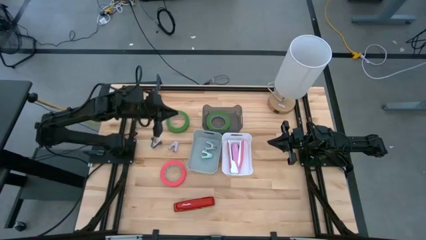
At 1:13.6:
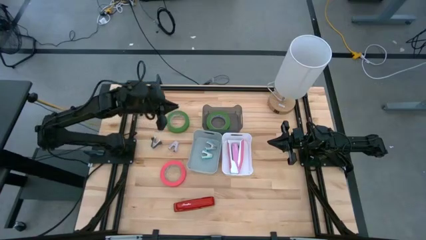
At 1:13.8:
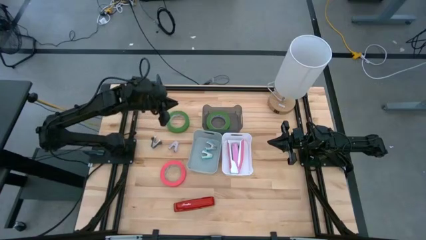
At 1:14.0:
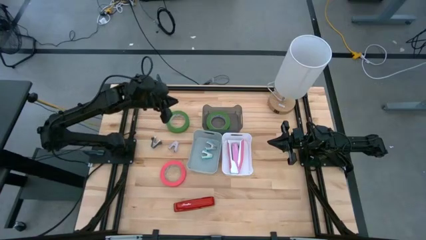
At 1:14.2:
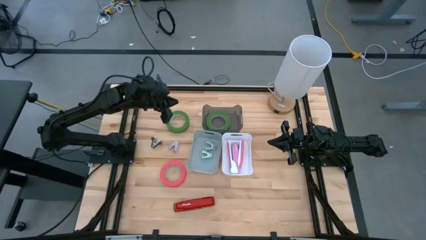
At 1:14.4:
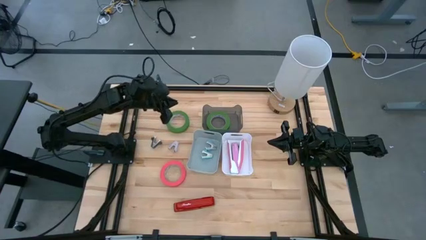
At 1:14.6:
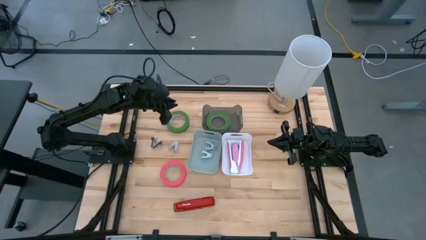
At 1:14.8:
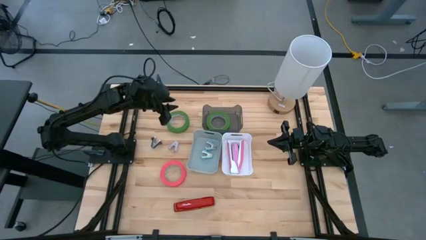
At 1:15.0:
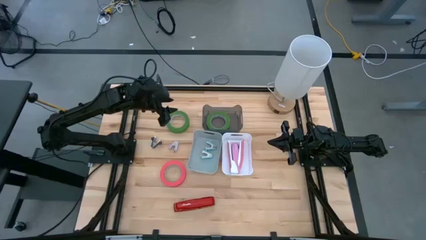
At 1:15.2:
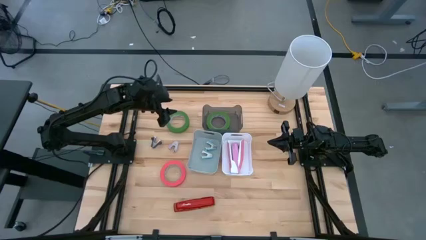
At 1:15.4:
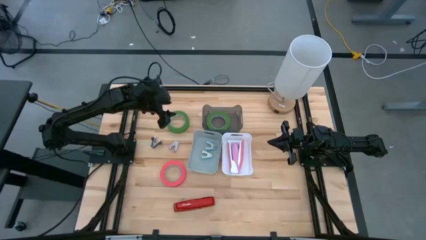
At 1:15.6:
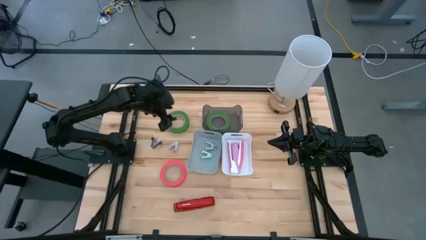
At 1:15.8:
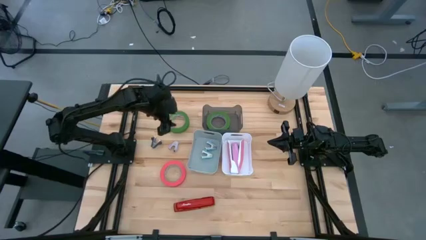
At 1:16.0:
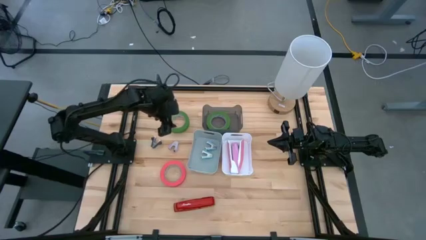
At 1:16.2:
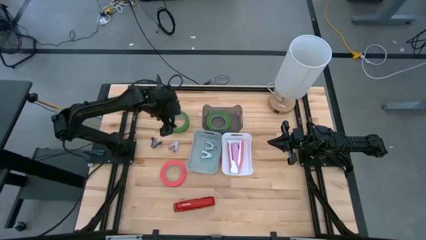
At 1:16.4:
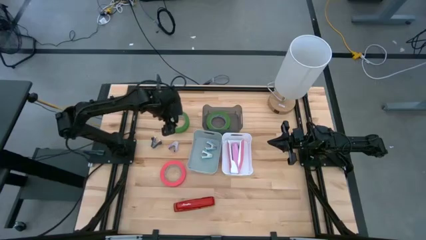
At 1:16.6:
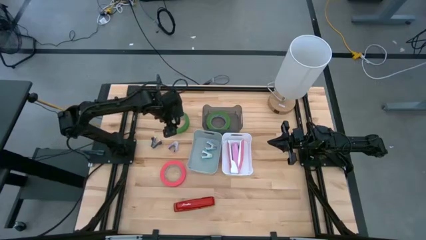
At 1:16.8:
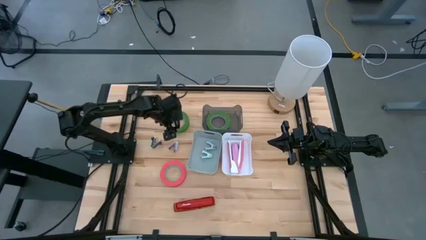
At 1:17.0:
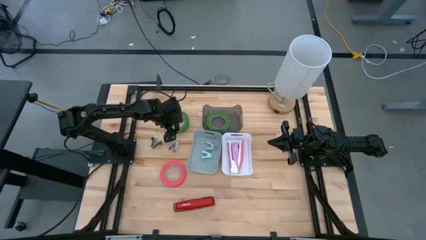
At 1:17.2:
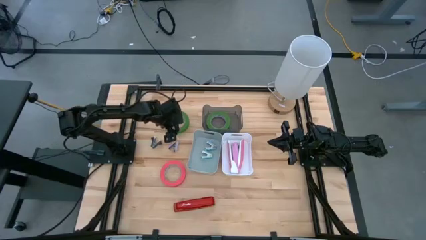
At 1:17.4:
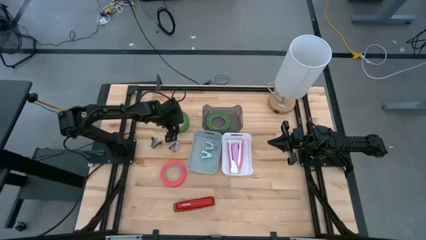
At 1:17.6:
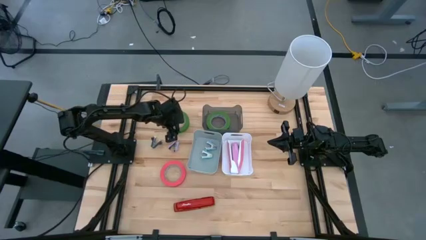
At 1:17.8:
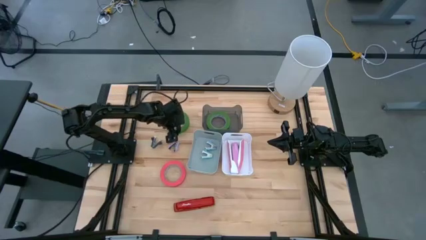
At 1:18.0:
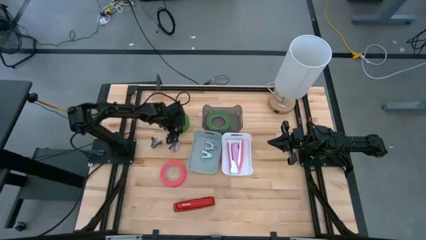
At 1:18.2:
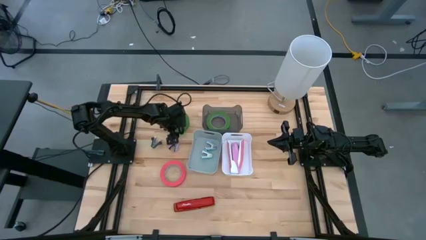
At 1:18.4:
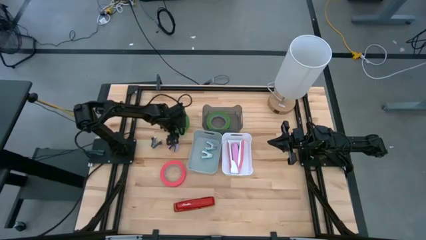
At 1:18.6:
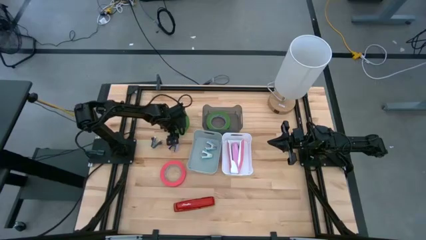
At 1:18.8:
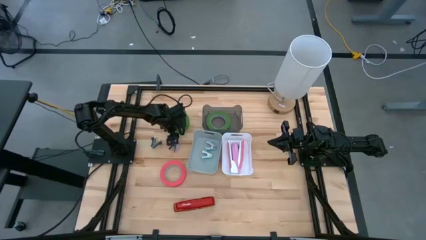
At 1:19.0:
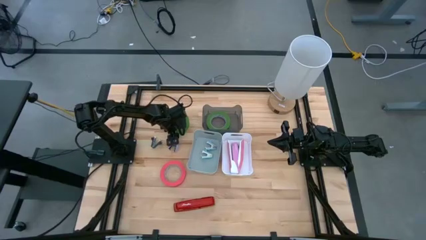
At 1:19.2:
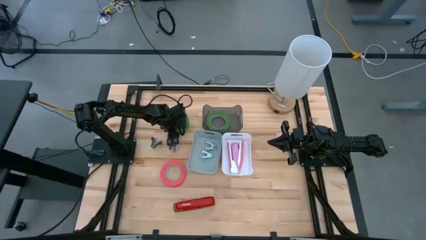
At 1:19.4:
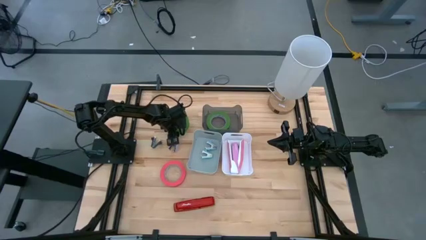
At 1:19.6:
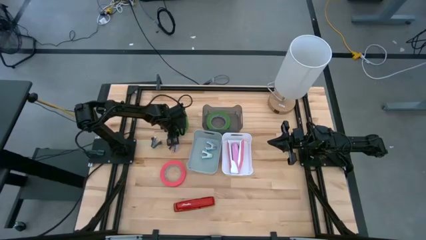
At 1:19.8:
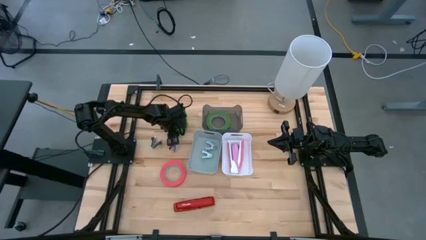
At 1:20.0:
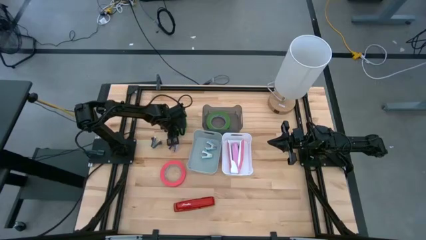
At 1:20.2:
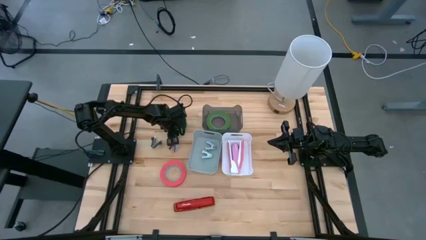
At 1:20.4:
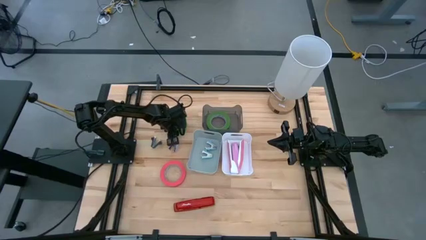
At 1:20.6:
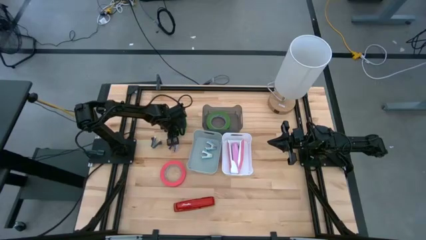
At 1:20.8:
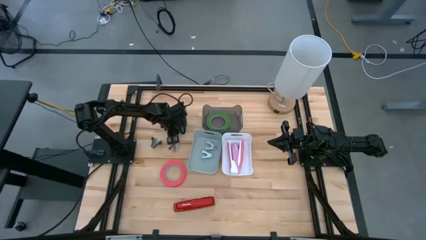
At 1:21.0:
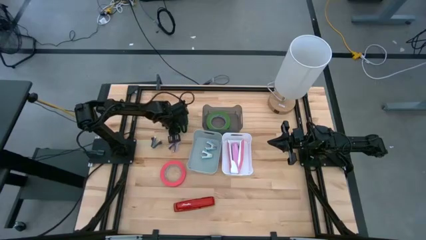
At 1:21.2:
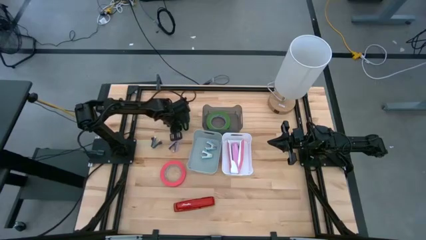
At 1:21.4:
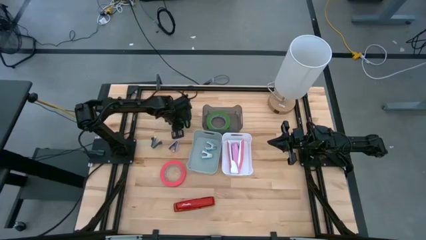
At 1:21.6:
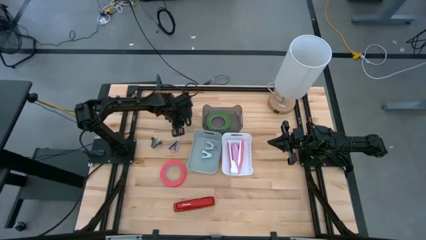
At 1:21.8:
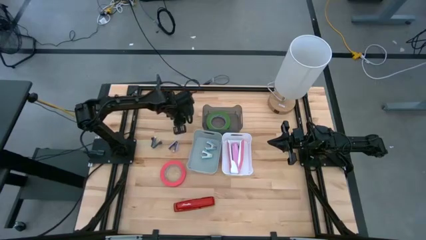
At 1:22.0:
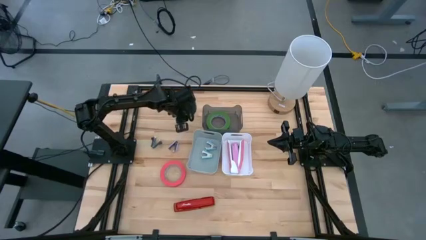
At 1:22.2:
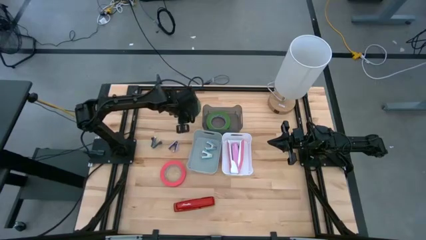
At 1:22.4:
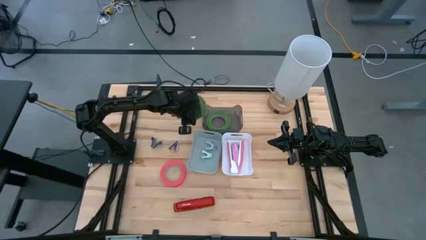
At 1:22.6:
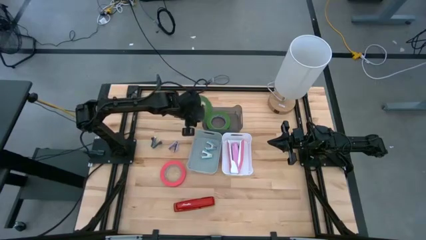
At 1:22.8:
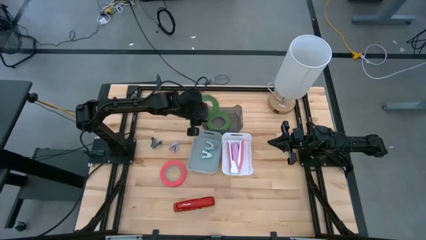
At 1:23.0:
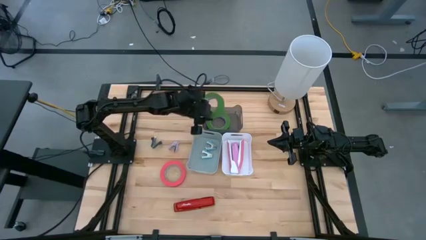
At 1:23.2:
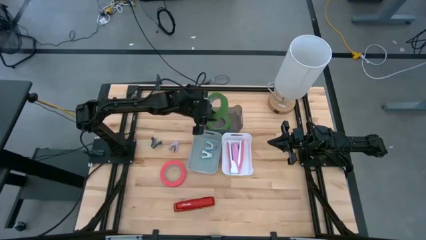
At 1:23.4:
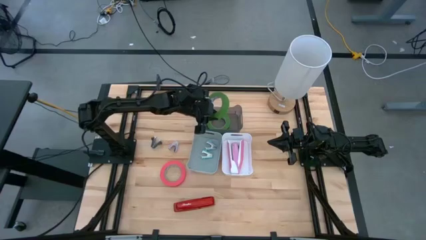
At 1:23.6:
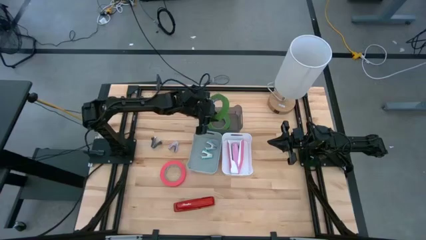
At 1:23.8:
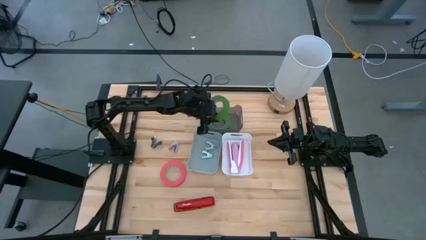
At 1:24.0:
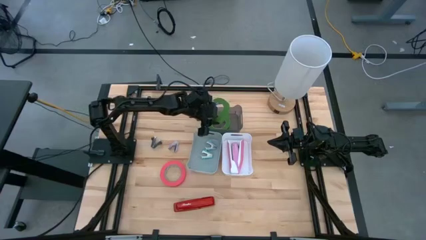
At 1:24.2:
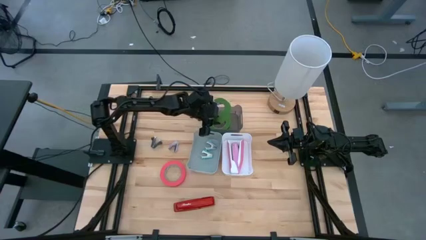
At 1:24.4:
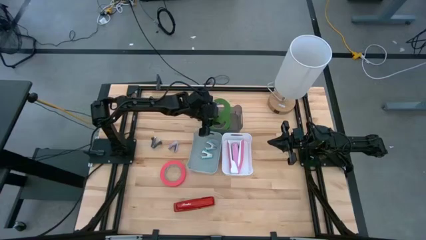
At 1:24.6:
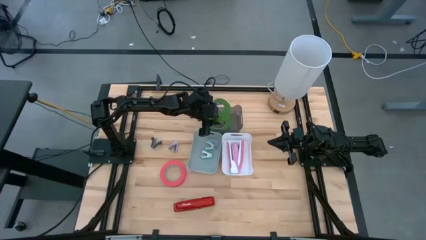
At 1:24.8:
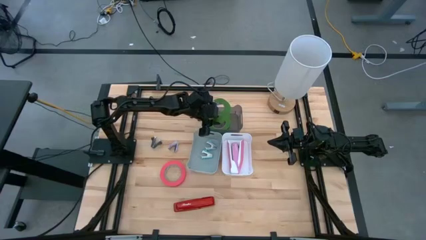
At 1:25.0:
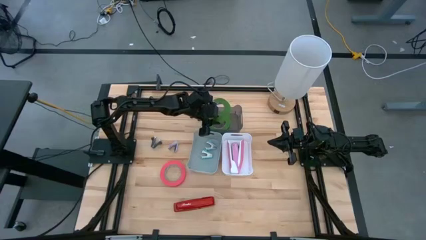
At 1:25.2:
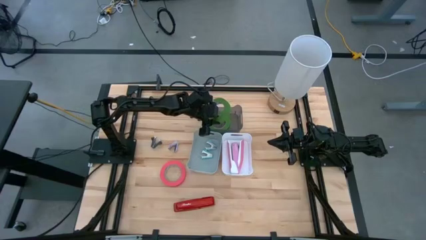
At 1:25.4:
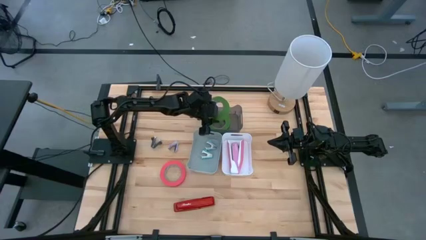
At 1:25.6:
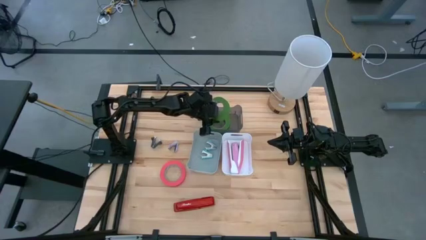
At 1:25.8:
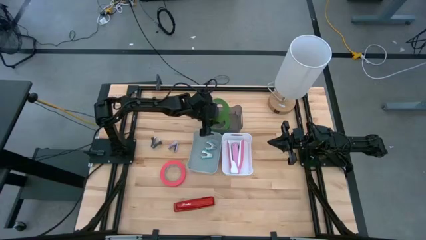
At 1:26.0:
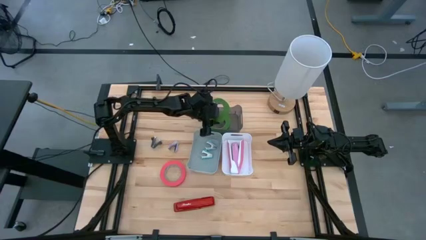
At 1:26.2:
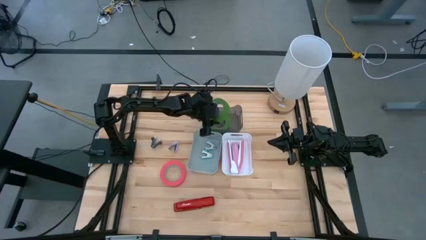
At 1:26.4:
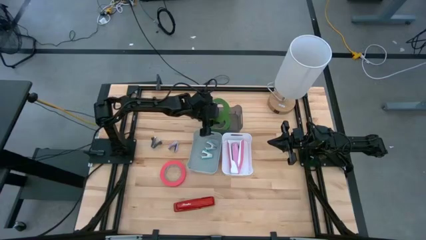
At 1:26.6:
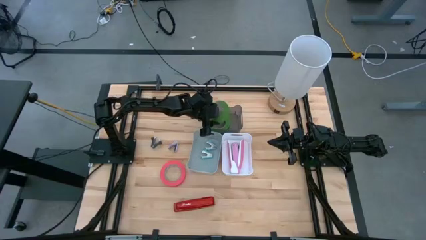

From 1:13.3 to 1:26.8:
Task: Pick and place Stapler, Stapler remover, tape
Put the green tape in the black bin
